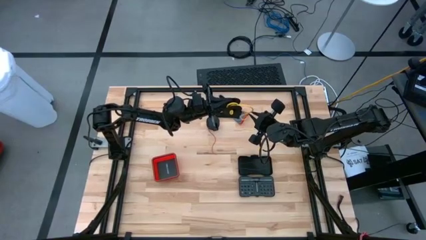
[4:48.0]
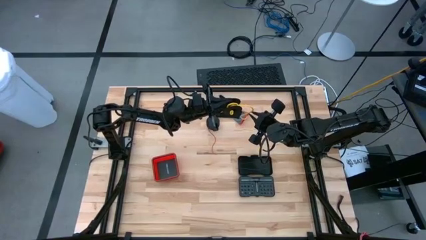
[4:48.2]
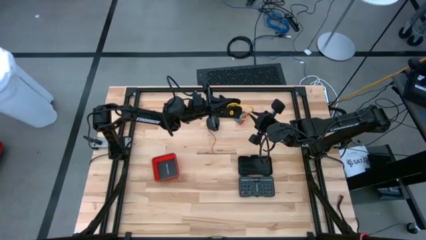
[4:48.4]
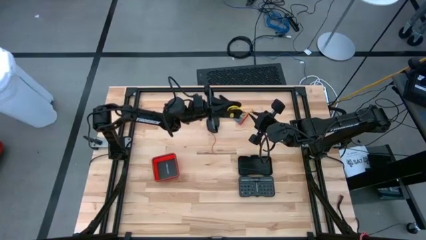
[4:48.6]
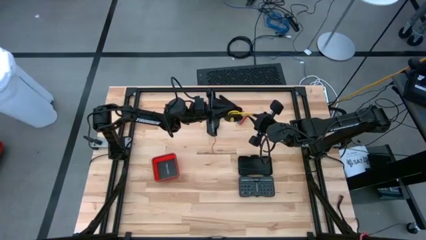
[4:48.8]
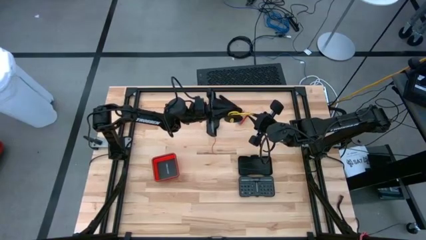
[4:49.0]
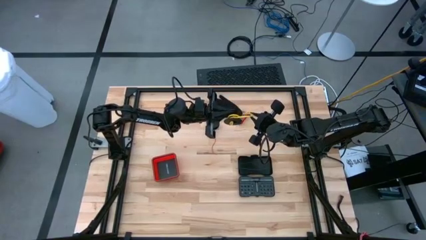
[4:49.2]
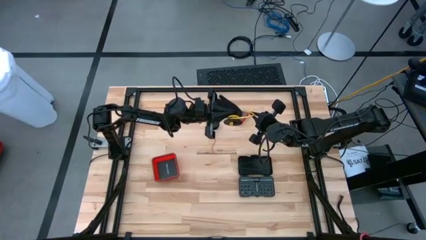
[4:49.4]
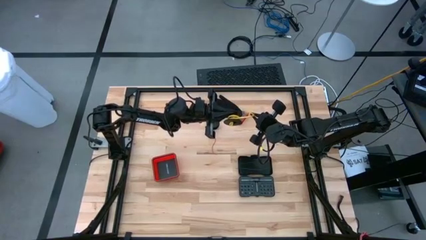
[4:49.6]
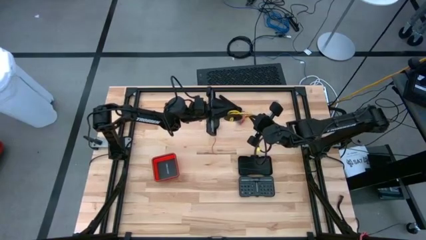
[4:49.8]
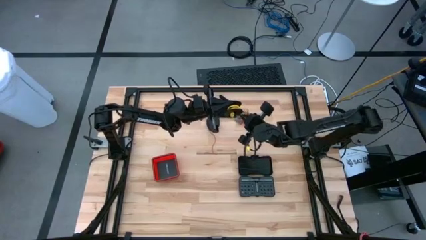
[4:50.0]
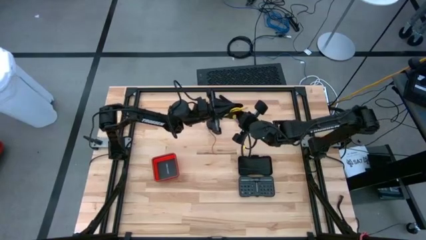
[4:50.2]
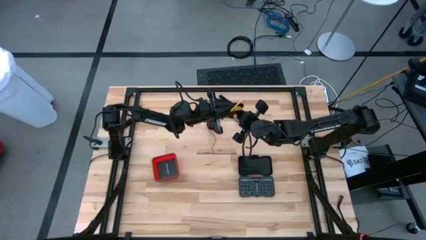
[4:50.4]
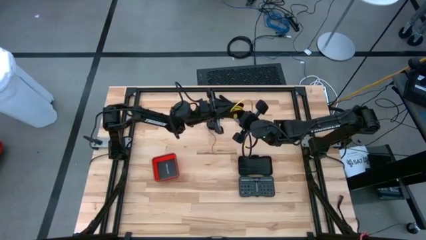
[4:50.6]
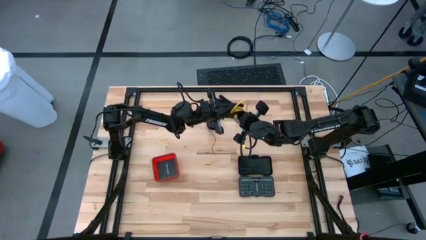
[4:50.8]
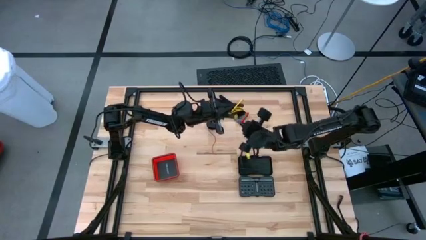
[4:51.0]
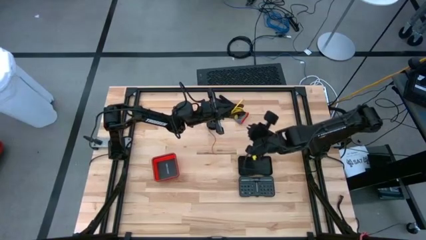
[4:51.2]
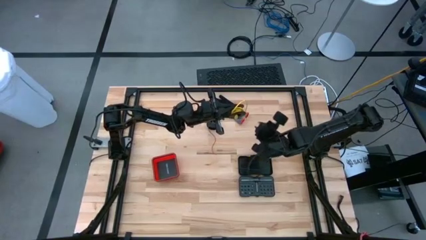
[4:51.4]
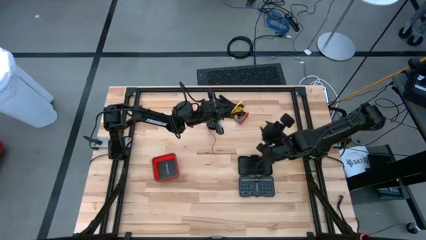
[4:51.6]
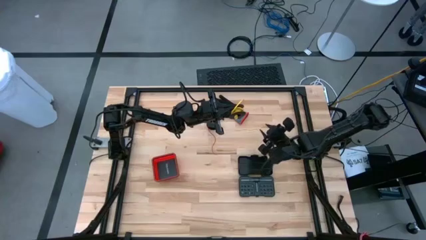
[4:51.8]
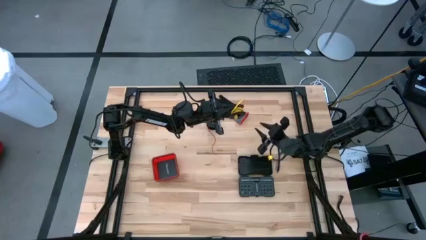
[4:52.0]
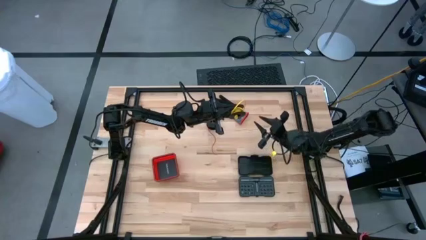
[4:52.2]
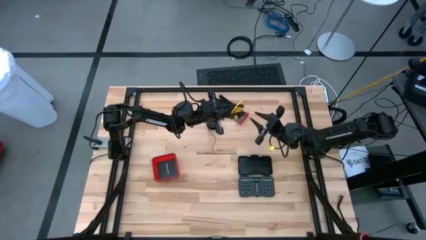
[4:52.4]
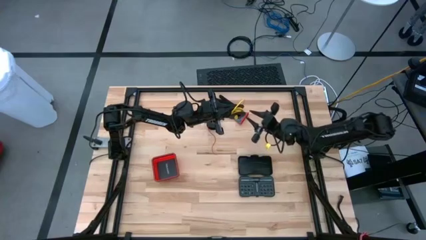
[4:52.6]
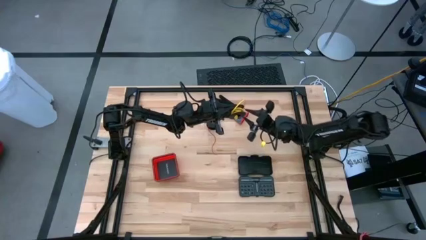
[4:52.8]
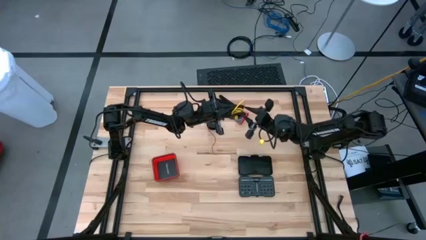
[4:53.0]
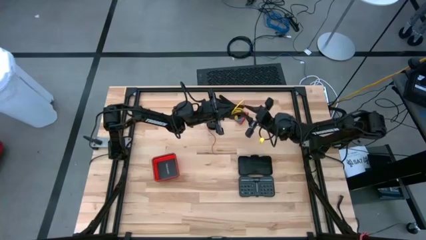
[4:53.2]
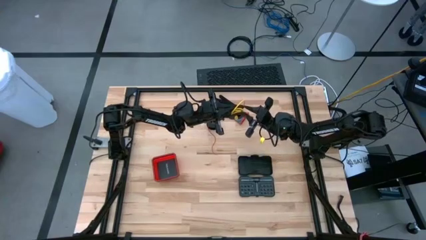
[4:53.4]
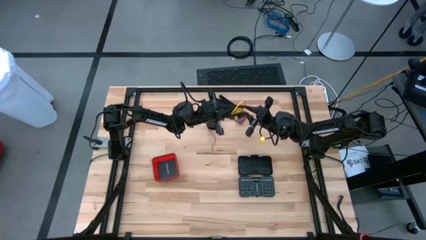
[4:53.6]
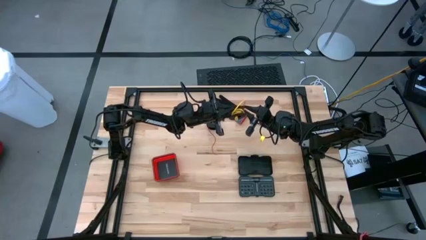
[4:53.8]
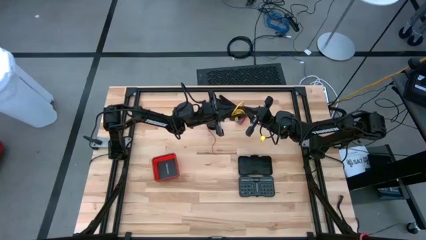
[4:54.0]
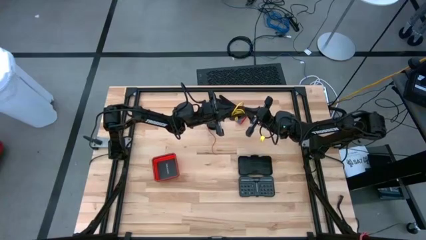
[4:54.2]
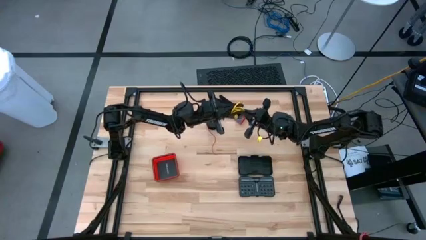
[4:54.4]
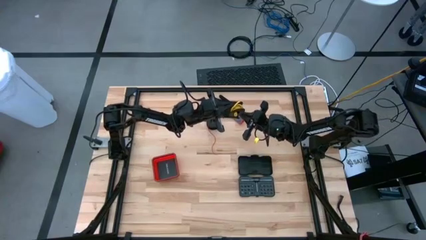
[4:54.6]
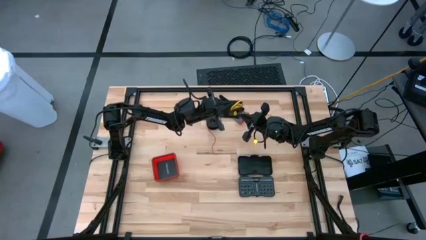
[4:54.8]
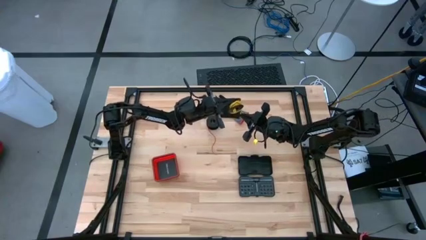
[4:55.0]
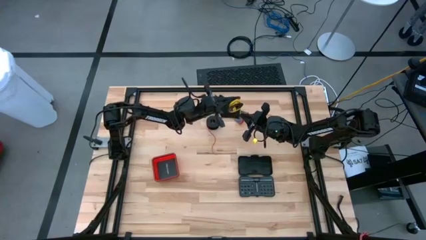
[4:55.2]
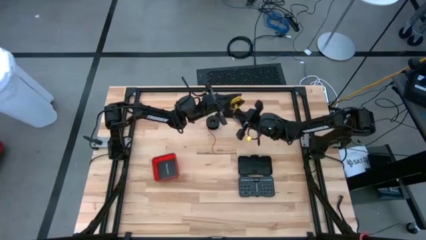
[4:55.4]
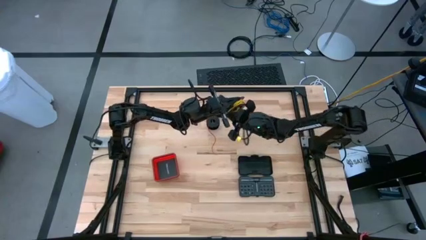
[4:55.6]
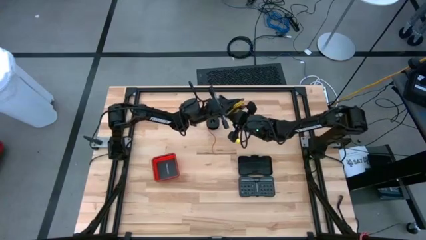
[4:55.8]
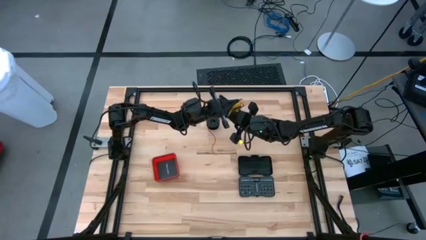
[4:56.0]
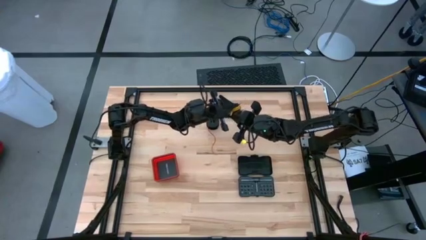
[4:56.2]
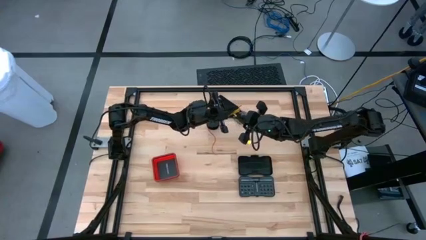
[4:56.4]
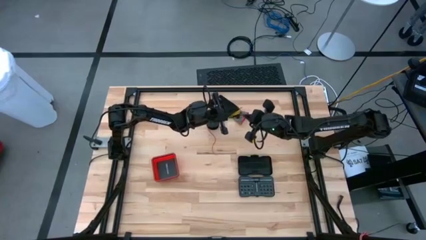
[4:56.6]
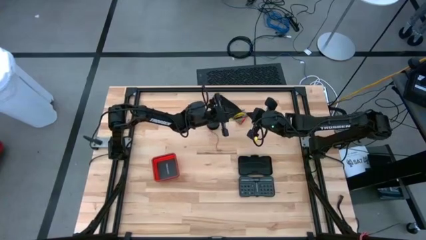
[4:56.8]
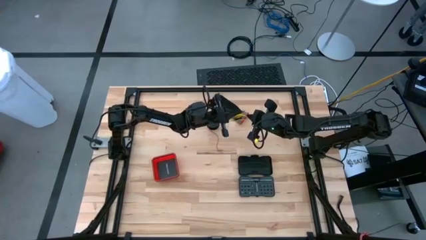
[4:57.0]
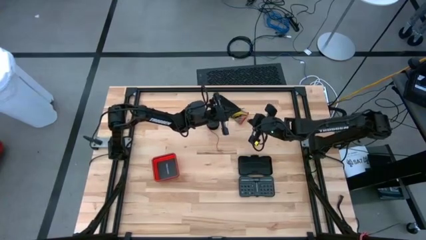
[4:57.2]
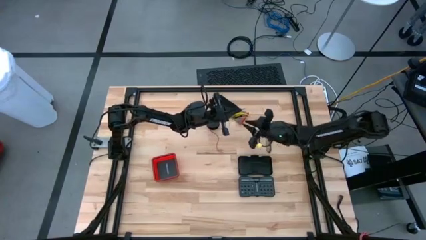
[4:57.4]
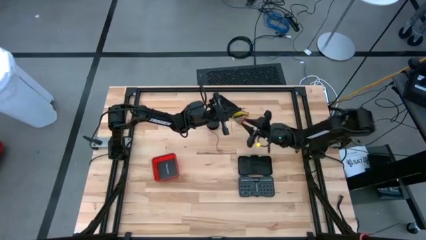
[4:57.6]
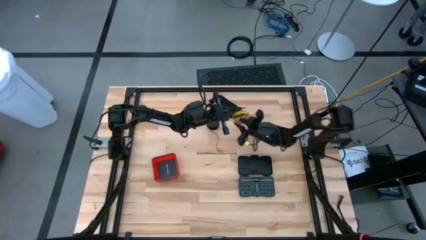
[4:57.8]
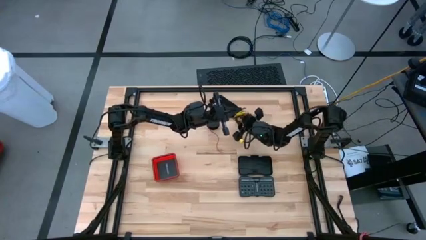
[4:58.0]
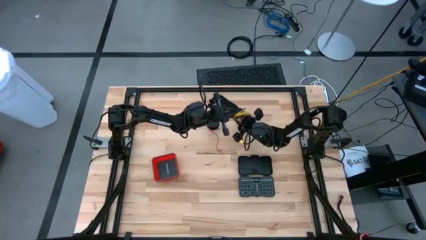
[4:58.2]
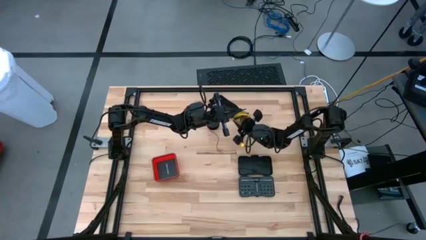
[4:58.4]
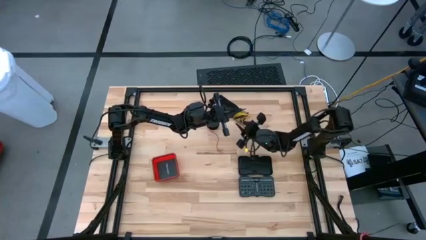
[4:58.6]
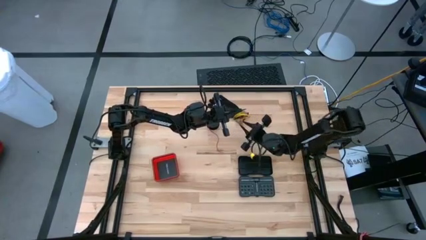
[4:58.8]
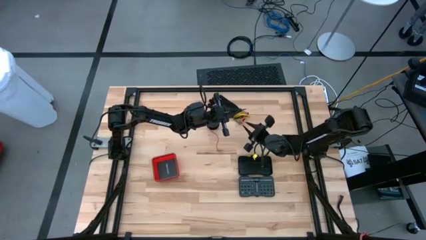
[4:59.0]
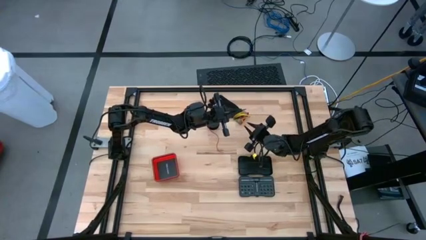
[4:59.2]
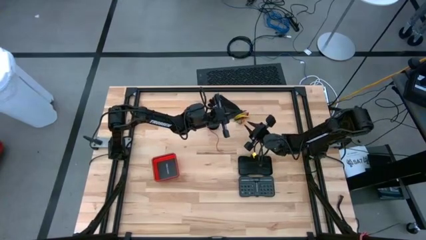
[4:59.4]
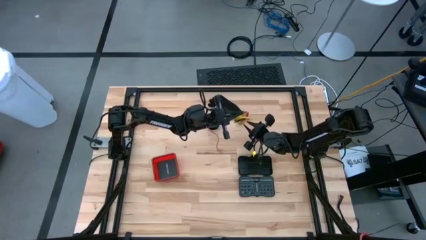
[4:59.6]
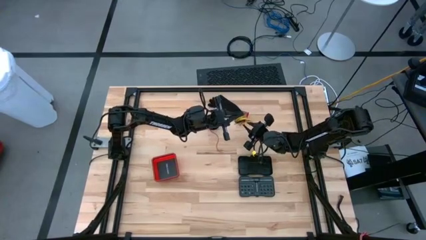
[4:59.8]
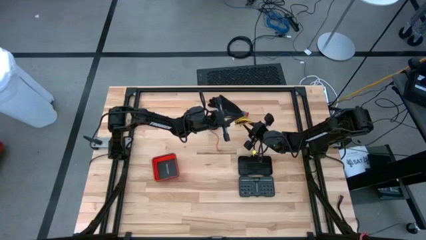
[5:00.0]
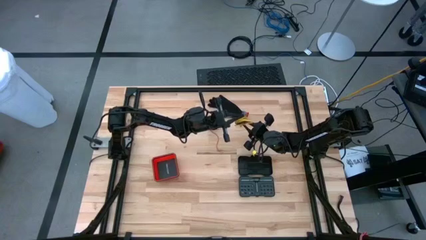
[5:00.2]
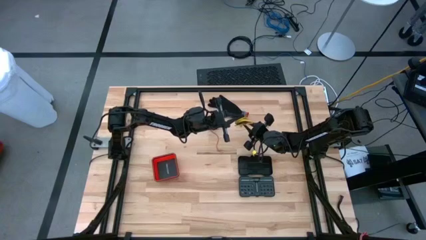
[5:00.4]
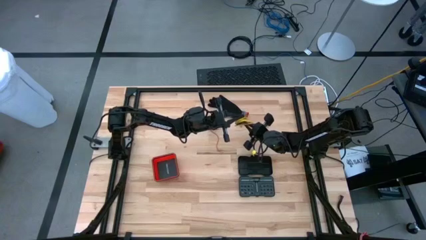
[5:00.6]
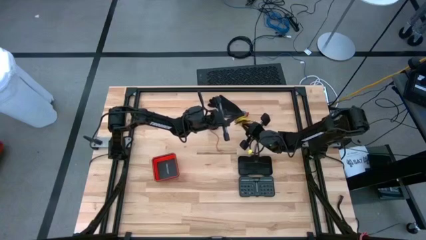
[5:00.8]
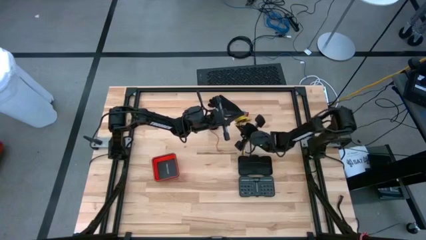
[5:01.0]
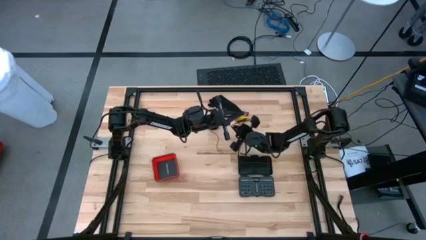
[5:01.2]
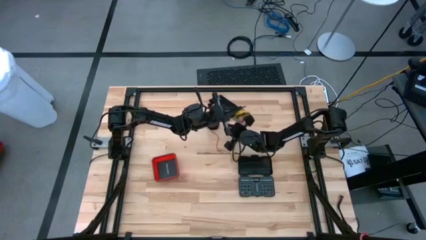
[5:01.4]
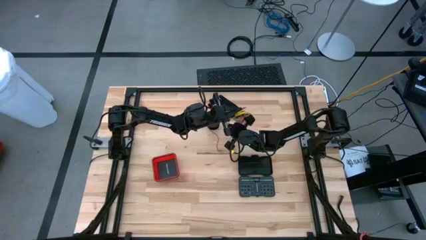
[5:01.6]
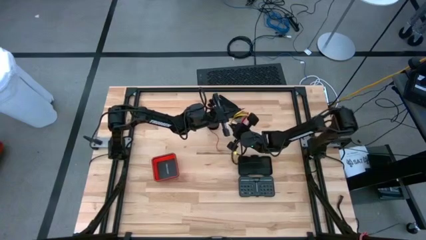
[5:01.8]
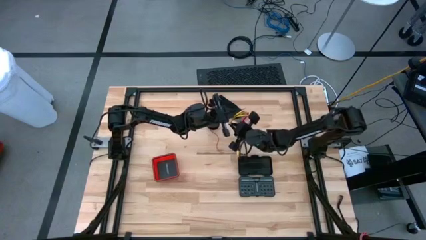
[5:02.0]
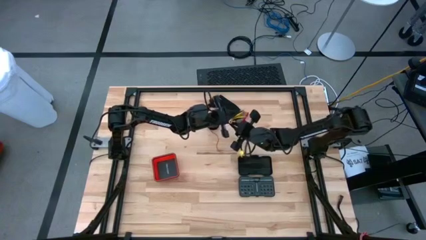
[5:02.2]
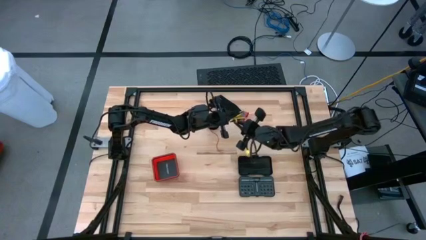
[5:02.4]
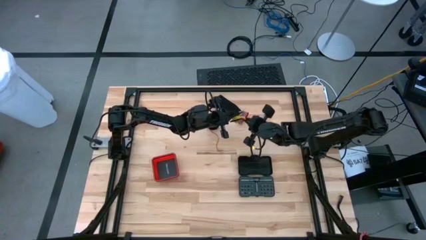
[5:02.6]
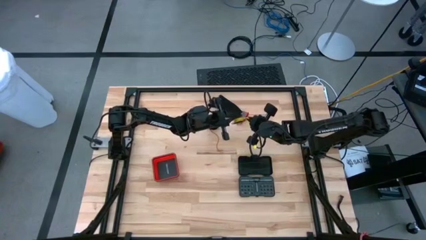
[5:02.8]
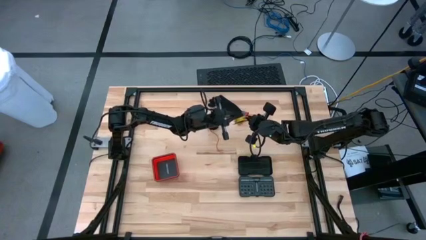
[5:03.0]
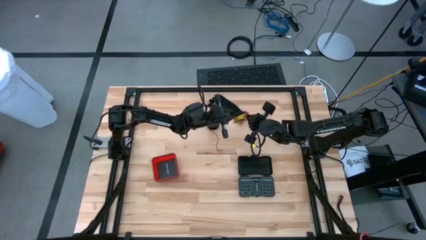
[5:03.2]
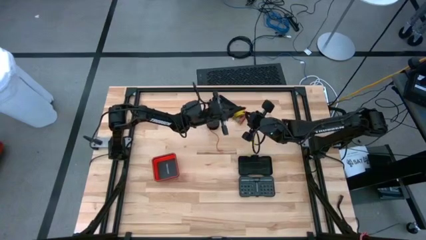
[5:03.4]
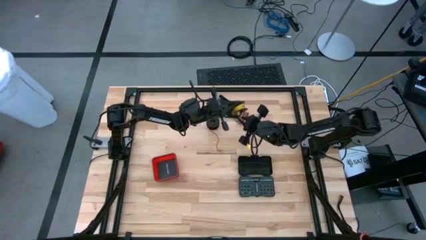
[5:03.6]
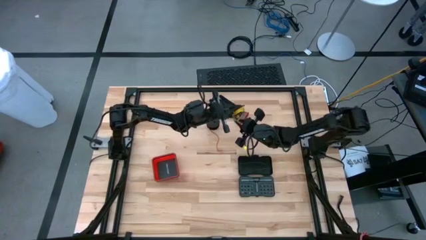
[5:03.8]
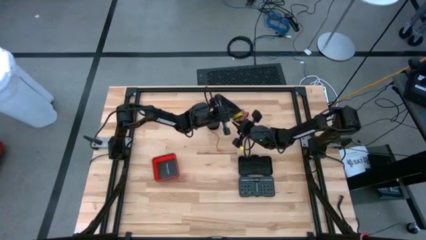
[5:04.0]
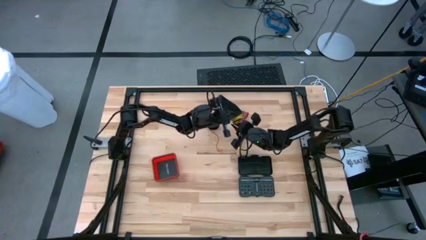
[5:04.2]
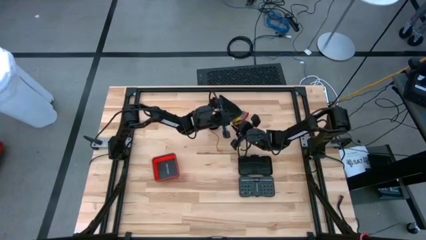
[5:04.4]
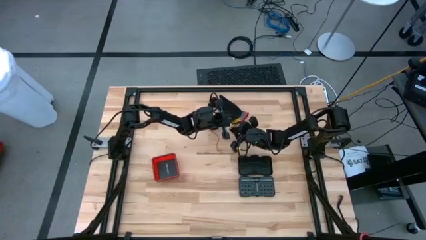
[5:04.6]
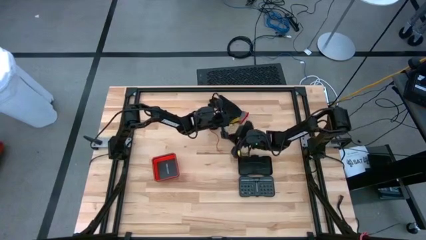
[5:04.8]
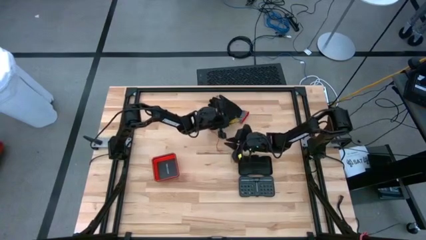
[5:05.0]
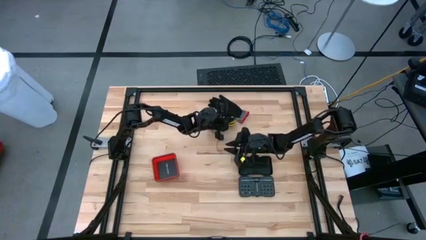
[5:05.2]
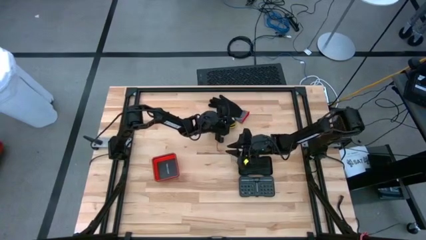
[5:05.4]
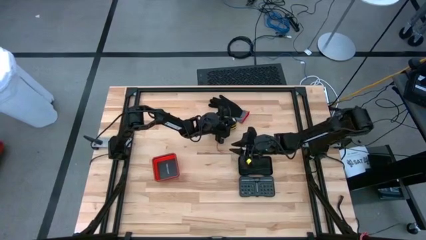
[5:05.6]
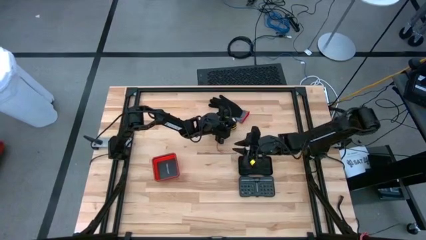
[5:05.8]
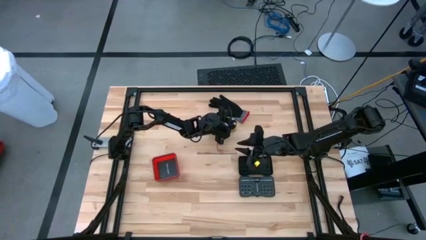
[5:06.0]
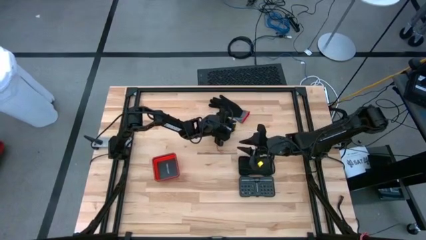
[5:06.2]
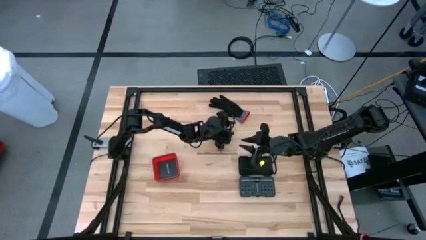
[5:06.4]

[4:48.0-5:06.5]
Task: Coil cords
Coil the yellow wire onto the spool
